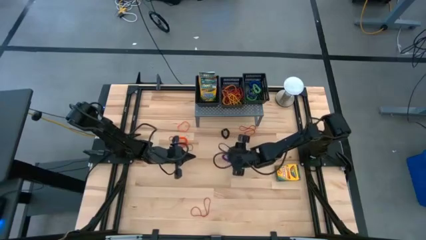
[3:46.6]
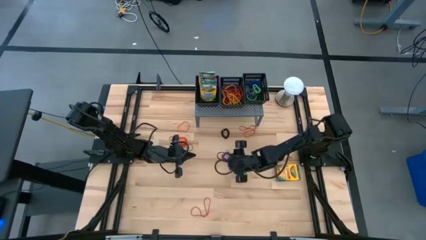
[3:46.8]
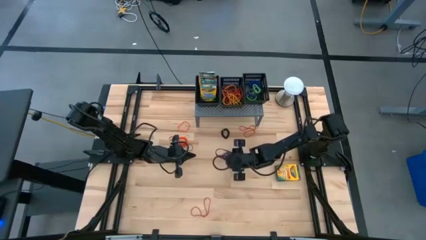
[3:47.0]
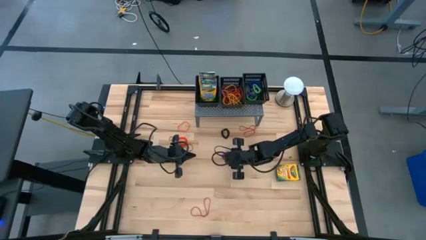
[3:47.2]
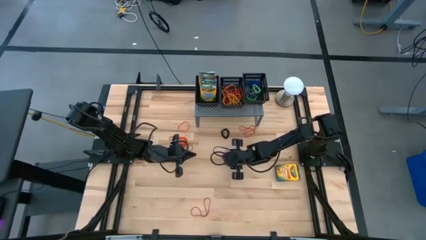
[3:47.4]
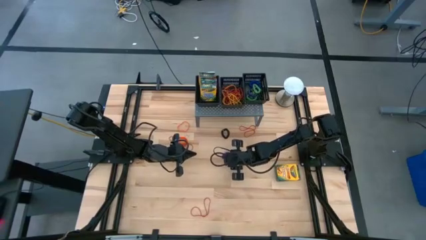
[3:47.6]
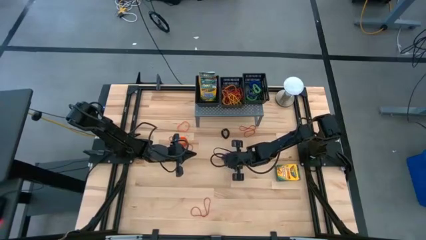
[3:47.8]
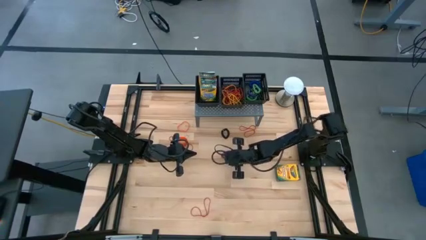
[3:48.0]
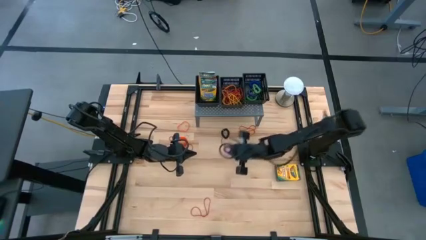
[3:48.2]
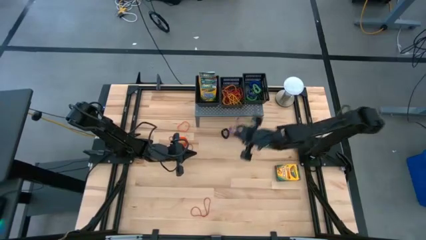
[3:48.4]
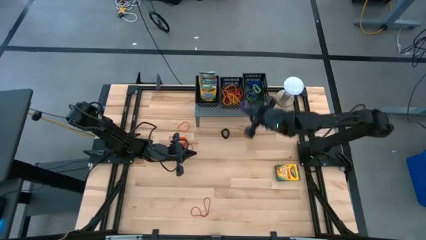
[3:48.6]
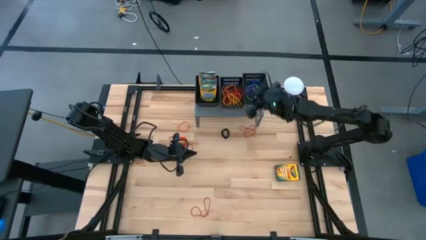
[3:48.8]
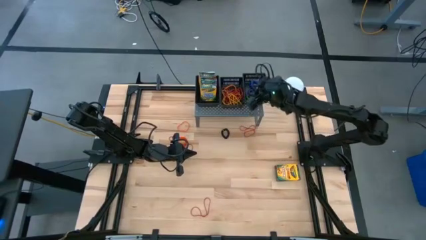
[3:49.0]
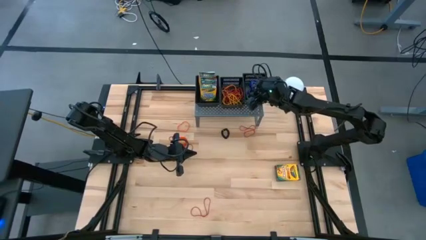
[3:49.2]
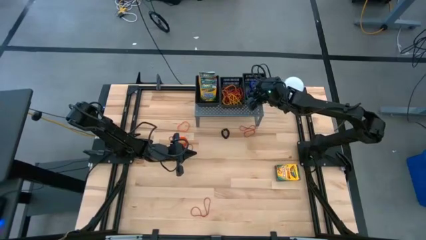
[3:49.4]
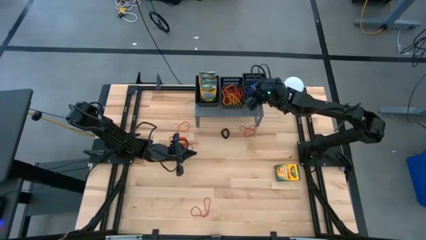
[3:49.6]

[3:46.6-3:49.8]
Task: Sort rubber bands into baskets
Put the purple spring rubberband into the right black basket on the shelf

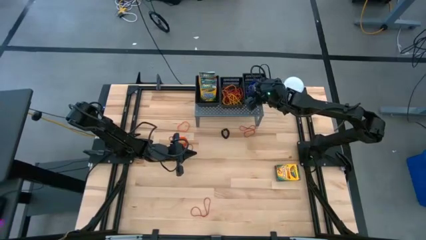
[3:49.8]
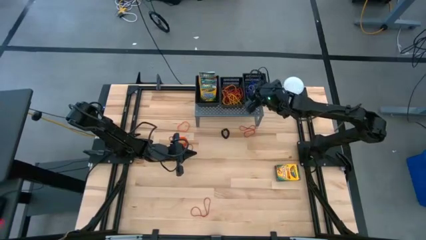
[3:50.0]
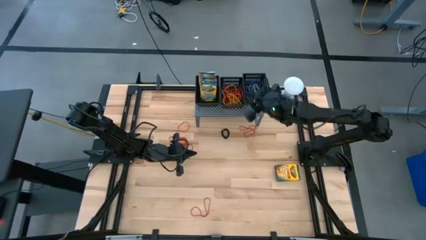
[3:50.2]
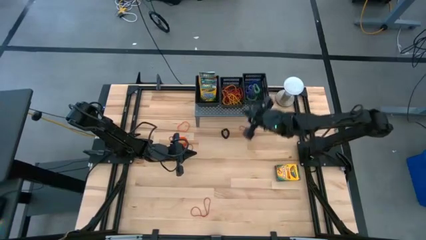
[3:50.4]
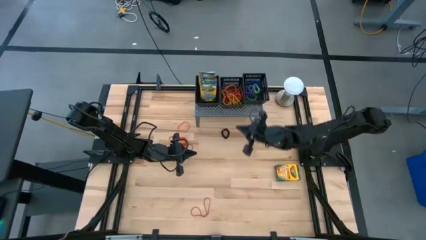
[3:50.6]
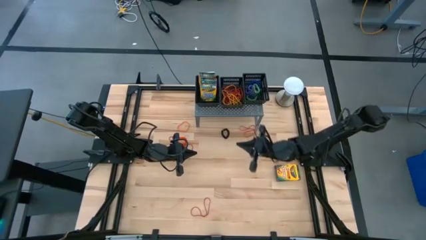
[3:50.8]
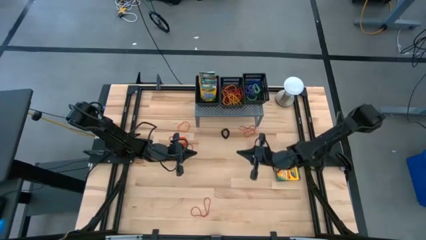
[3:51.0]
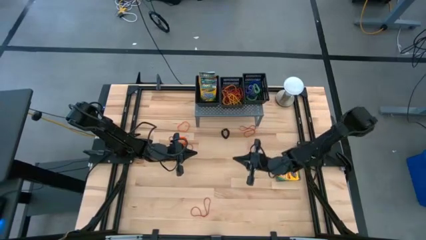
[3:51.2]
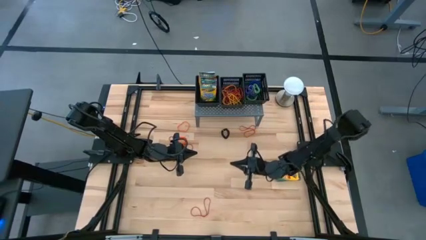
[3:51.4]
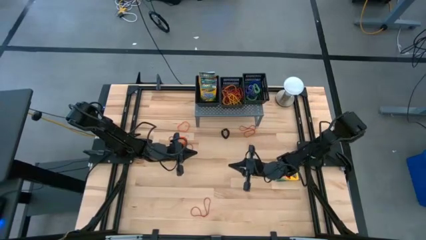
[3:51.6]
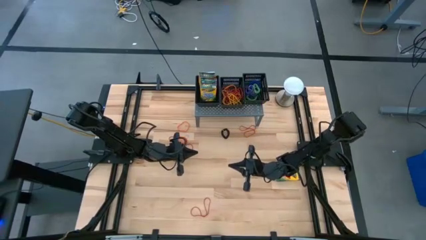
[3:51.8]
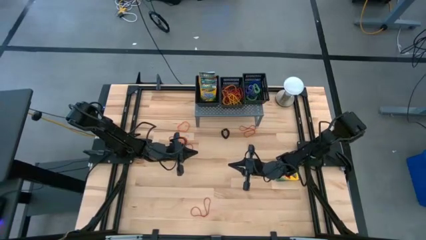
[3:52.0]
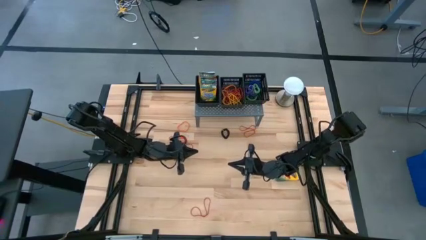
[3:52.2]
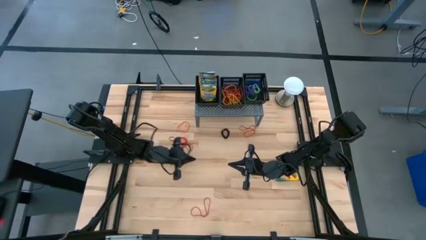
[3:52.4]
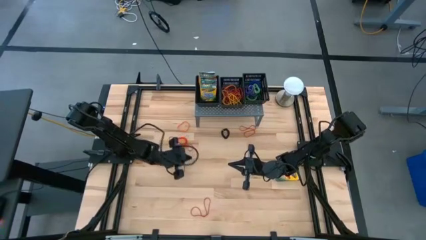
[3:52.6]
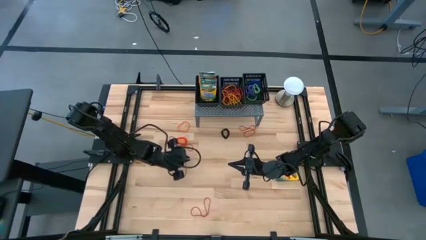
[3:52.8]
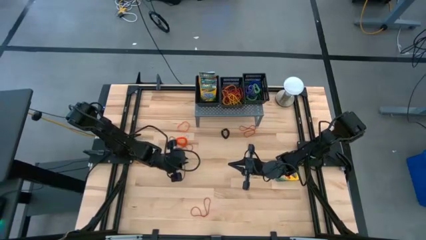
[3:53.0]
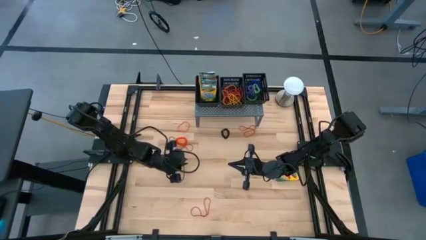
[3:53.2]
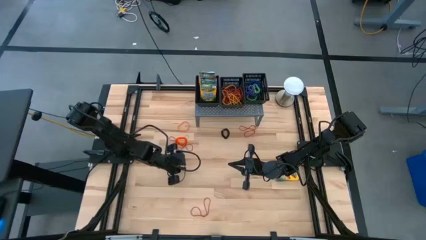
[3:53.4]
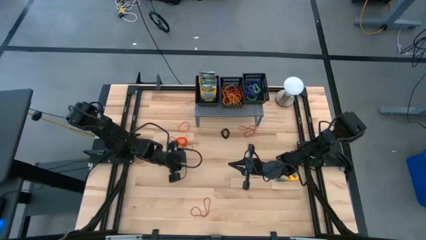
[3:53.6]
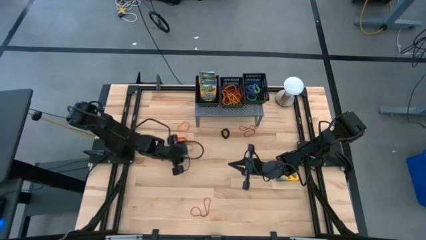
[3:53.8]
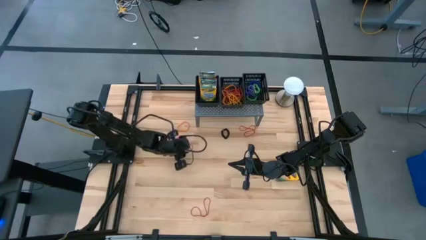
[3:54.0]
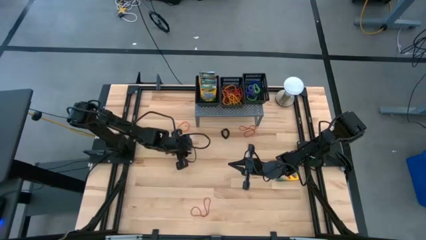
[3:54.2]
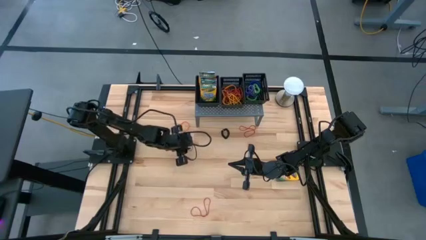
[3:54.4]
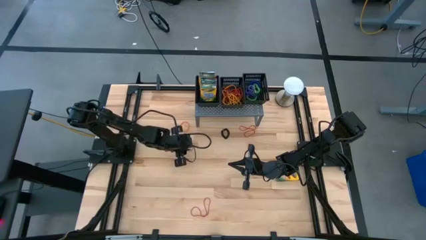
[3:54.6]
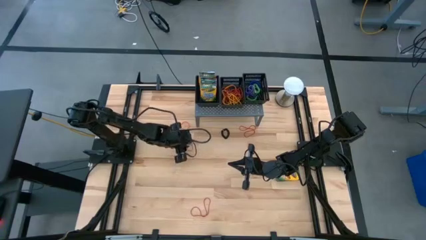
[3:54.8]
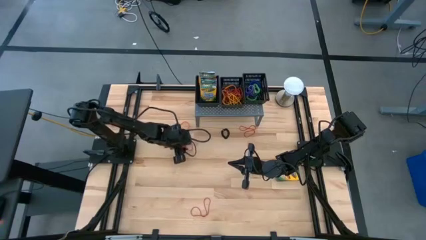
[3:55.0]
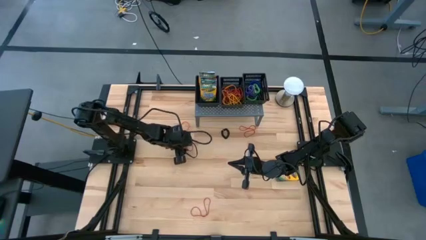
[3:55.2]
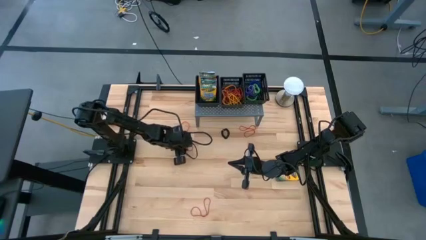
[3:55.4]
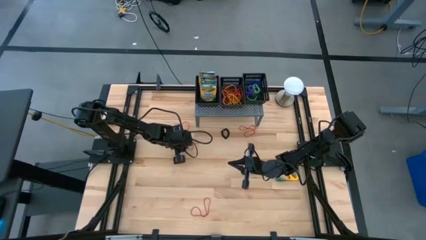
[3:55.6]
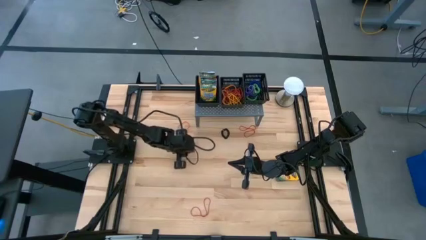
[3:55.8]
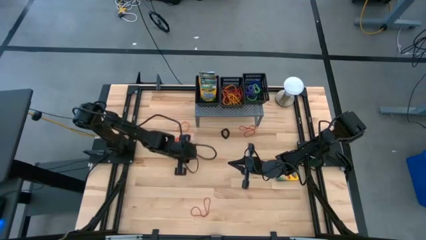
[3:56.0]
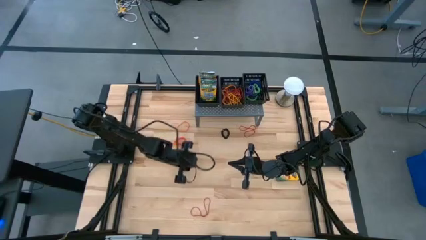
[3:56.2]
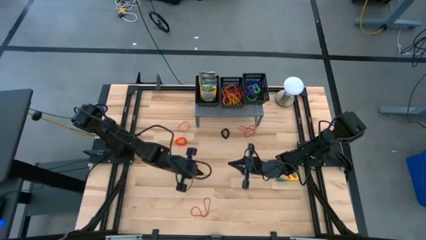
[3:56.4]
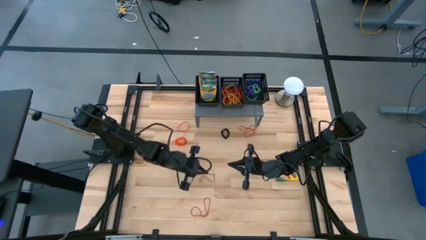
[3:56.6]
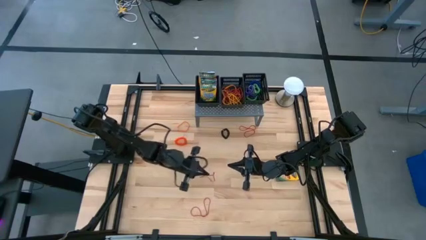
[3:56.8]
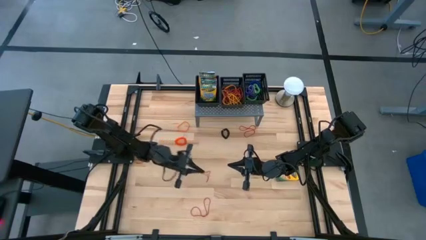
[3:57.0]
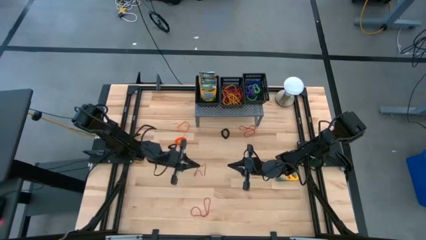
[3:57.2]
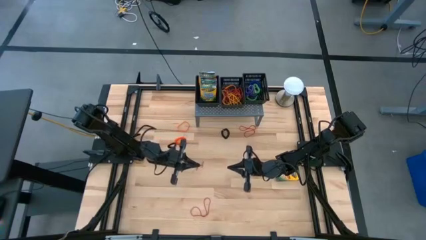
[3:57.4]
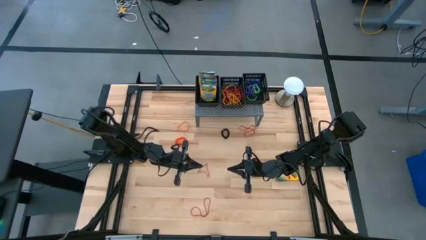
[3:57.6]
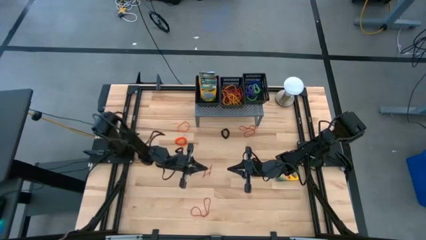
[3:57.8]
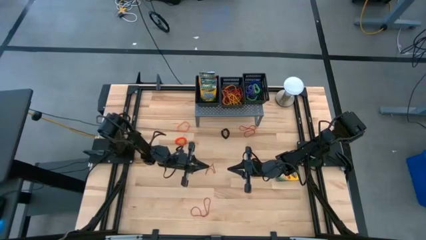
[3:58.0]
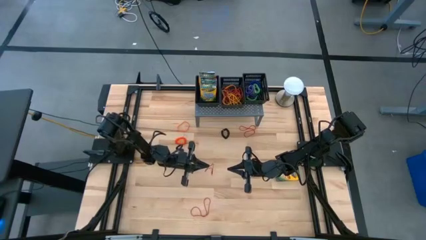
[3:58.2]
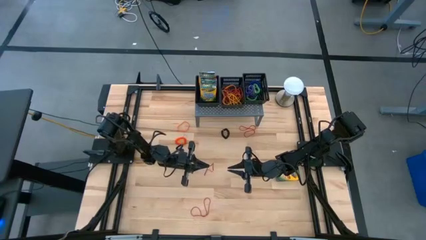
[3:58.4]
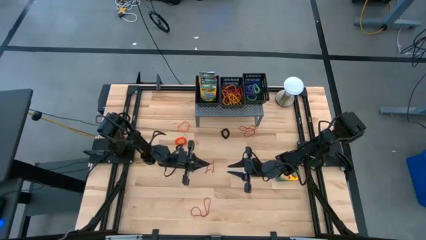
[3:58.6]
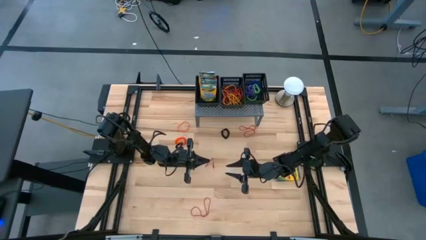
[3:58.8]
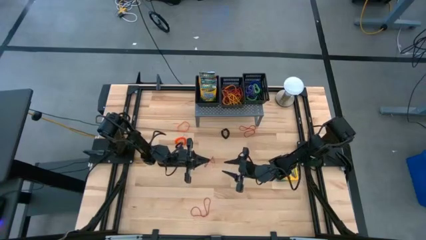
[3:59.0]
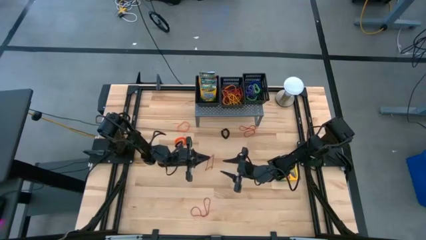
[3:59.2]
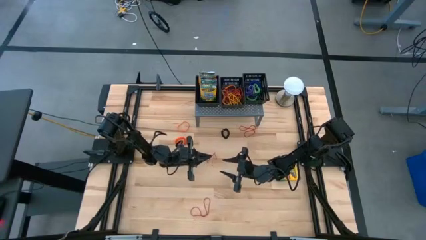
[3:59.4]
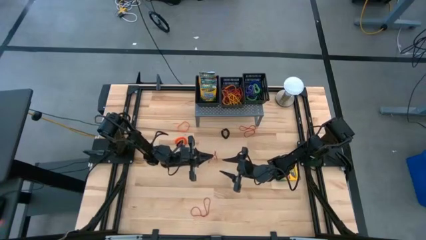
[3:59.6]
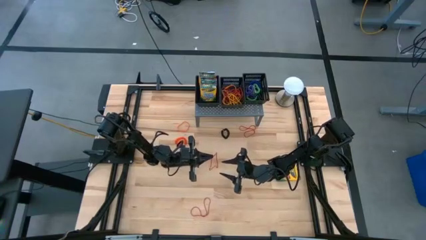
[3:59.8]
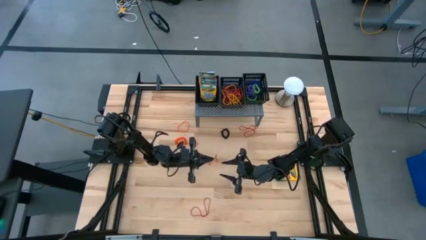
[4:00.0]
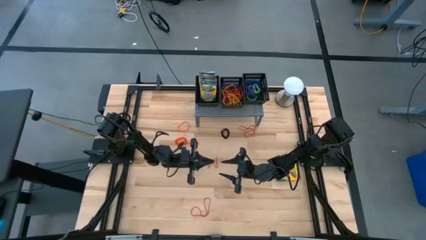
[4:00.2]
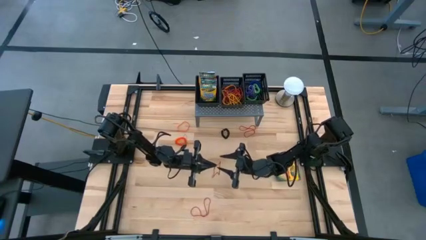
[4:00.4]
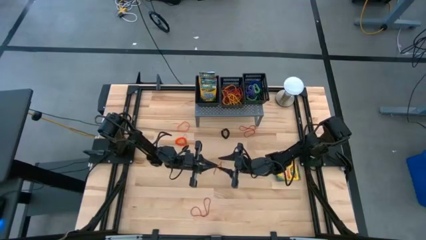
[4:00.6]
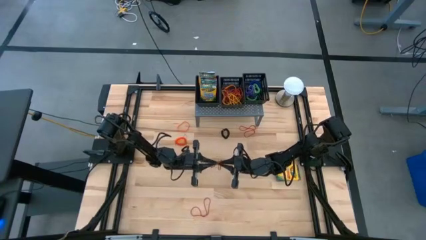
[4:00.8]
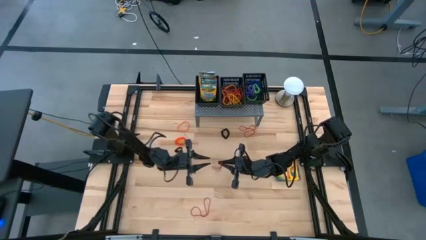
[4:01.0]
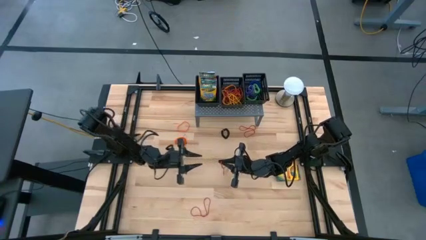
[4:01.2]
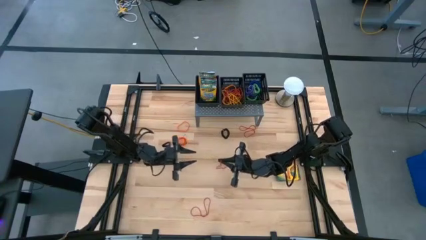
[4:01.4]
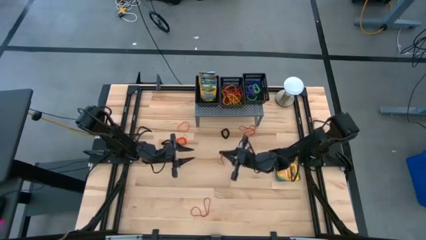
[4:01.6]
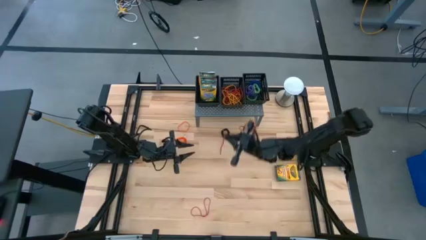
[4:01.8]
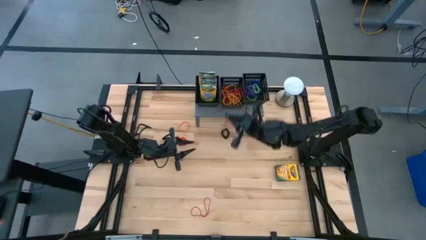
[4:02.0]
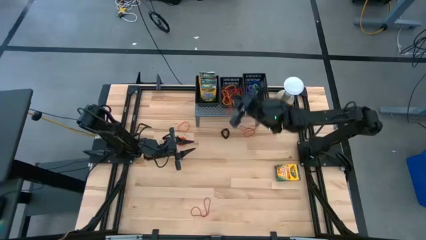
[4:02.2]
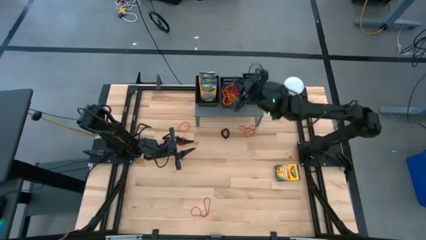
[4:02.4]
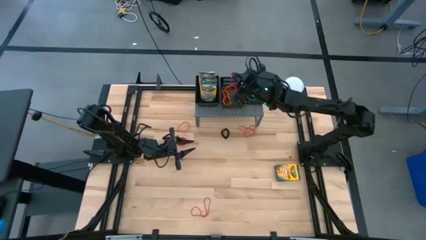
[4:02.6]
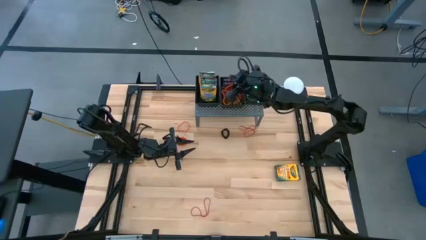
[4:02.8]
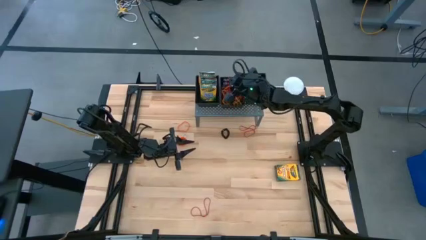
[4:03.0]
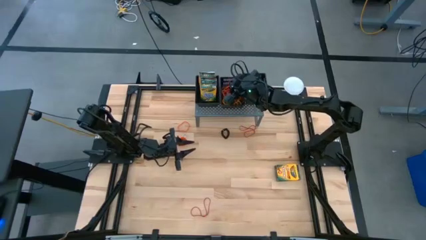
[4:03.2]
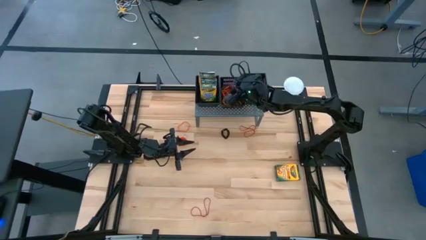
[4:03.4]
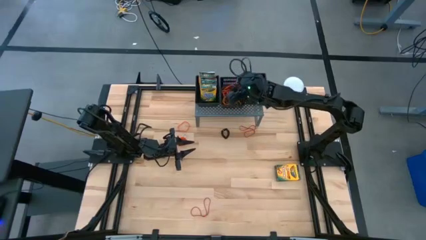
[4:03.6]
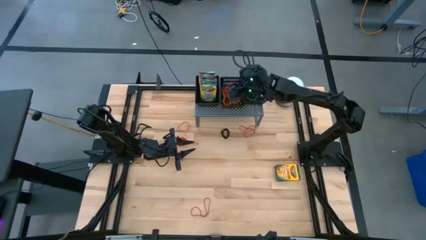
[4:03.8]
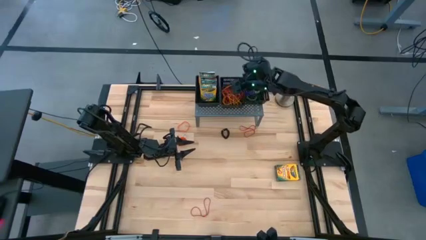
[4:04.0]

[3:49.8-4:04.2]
Put the red rubber band into the middle black basket on the shelf
